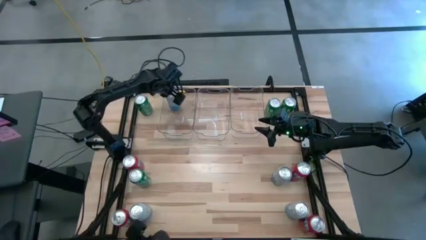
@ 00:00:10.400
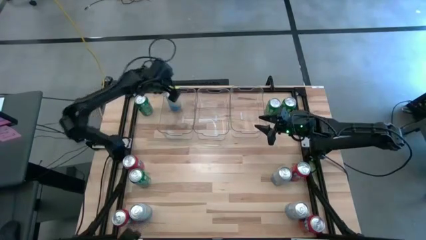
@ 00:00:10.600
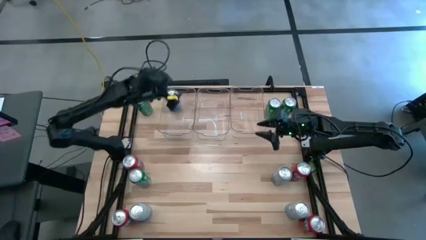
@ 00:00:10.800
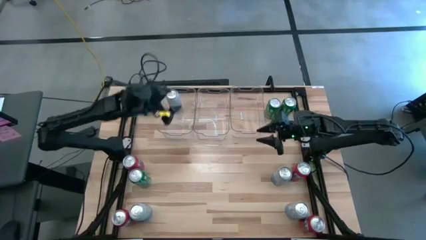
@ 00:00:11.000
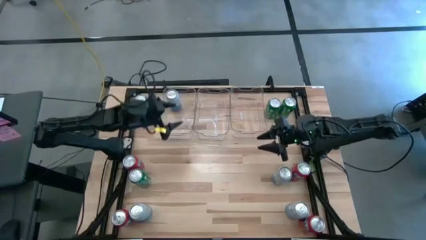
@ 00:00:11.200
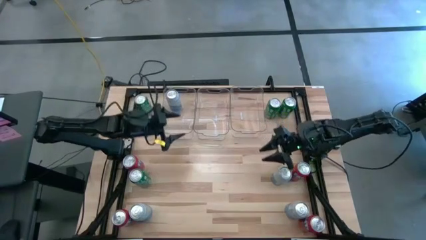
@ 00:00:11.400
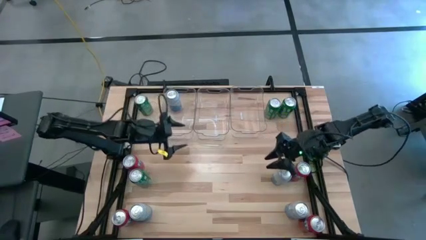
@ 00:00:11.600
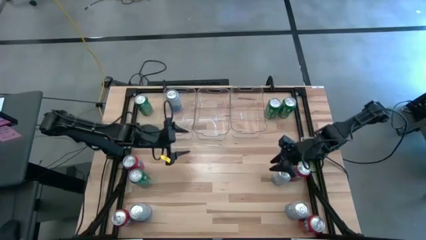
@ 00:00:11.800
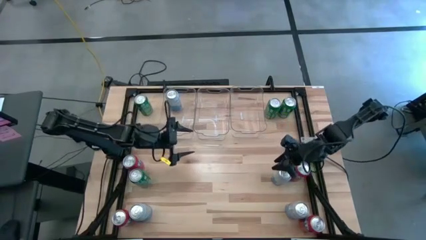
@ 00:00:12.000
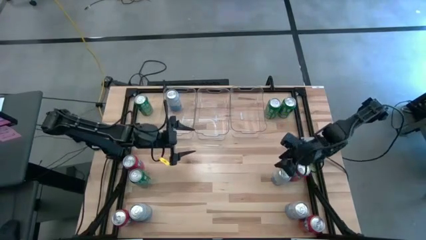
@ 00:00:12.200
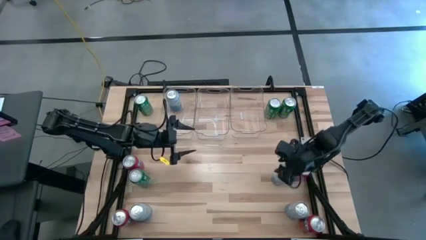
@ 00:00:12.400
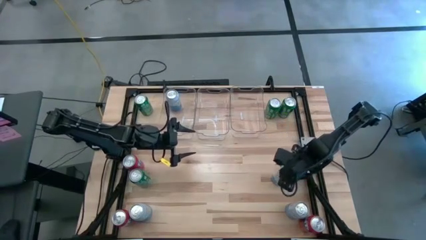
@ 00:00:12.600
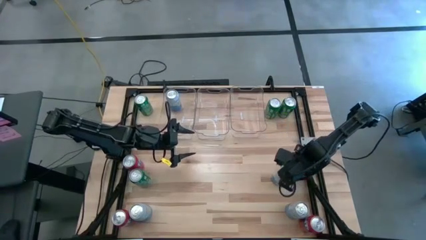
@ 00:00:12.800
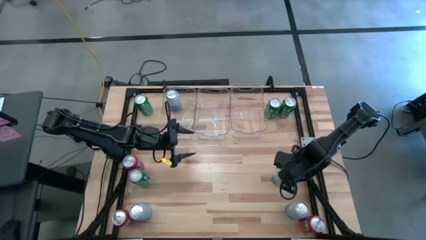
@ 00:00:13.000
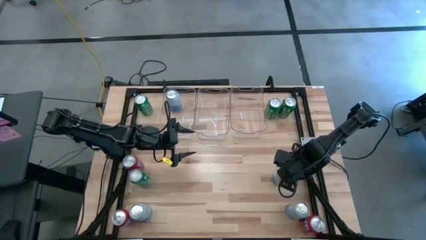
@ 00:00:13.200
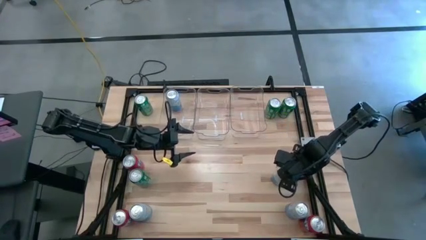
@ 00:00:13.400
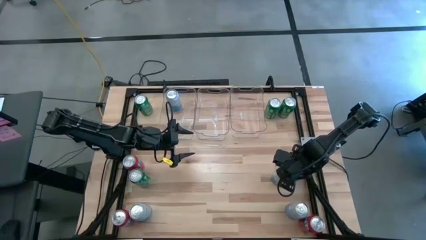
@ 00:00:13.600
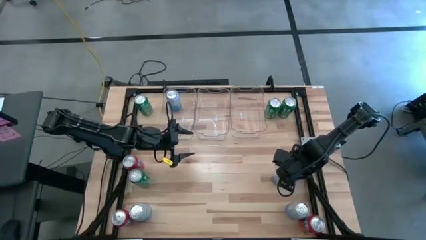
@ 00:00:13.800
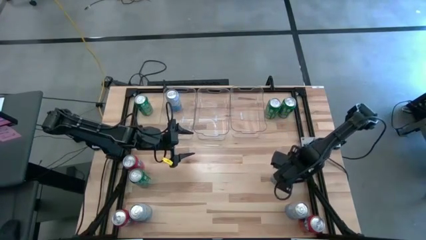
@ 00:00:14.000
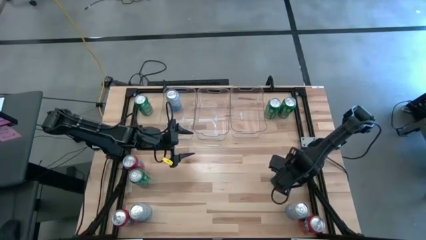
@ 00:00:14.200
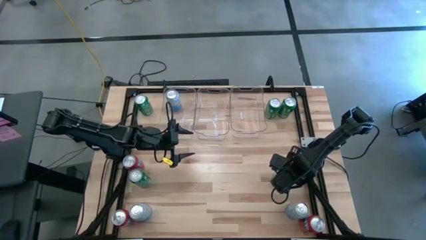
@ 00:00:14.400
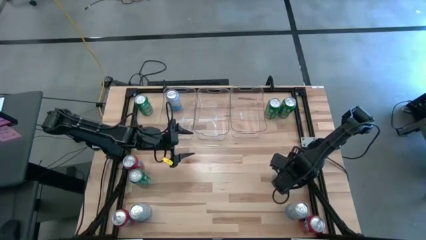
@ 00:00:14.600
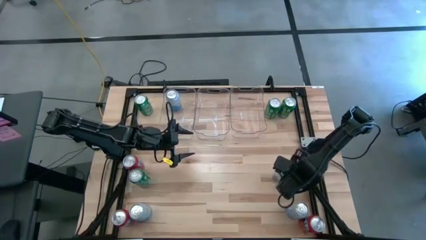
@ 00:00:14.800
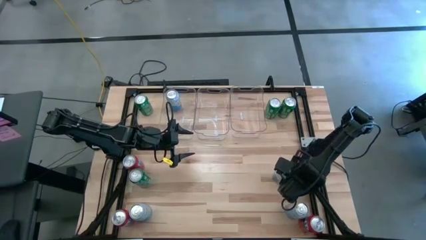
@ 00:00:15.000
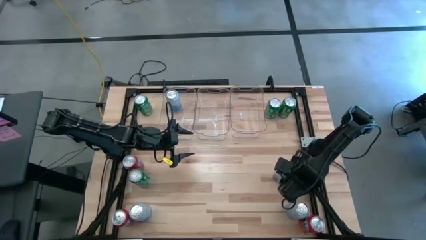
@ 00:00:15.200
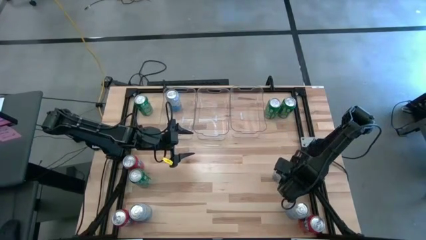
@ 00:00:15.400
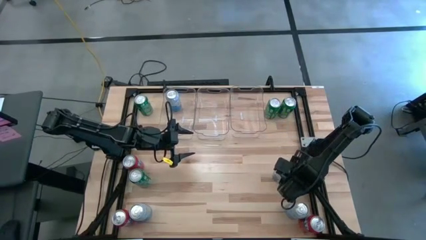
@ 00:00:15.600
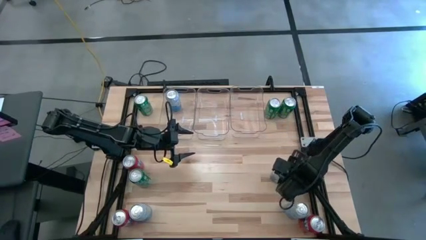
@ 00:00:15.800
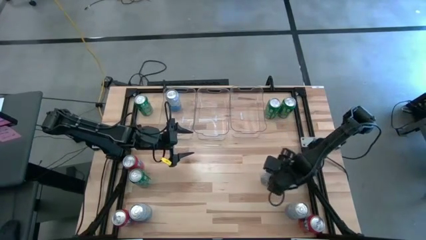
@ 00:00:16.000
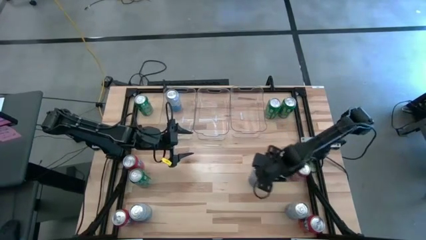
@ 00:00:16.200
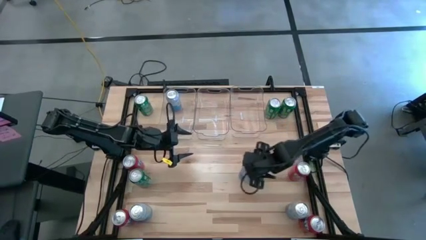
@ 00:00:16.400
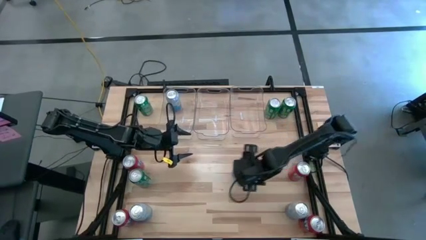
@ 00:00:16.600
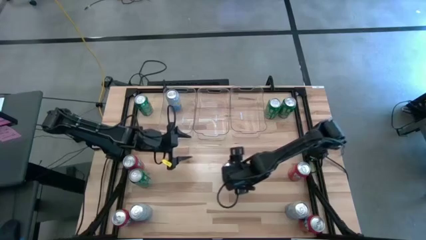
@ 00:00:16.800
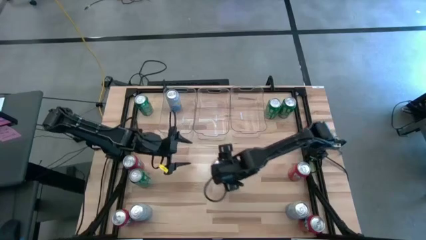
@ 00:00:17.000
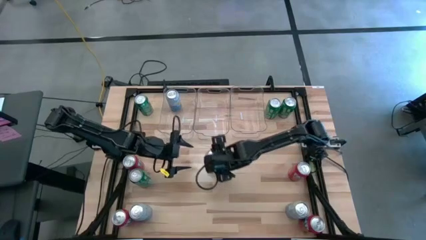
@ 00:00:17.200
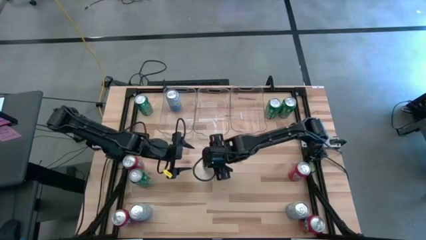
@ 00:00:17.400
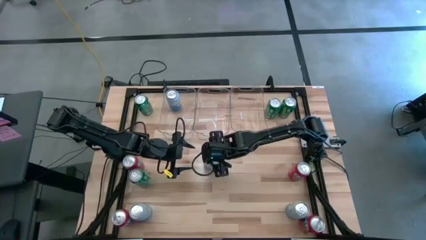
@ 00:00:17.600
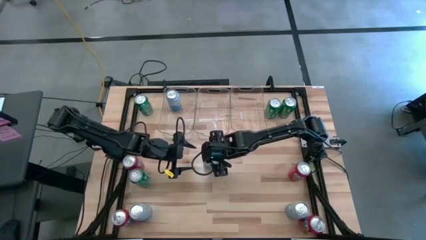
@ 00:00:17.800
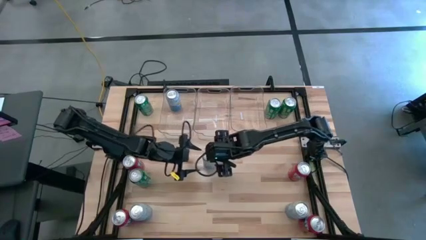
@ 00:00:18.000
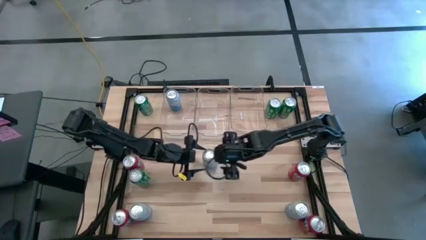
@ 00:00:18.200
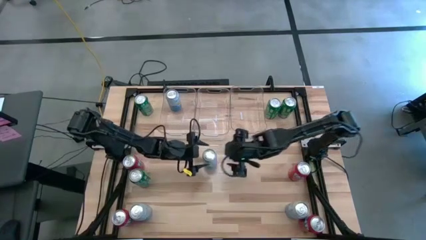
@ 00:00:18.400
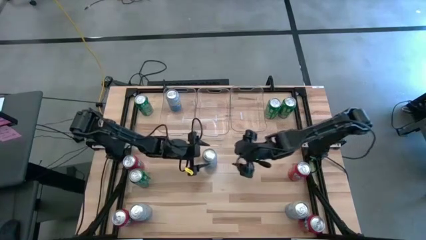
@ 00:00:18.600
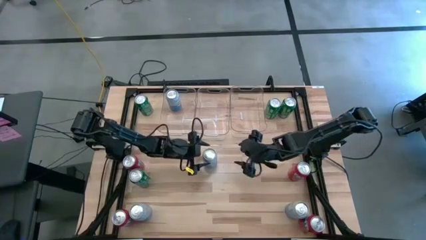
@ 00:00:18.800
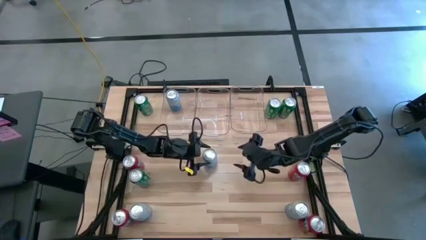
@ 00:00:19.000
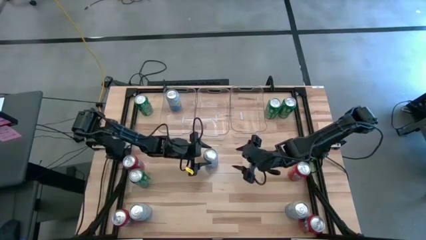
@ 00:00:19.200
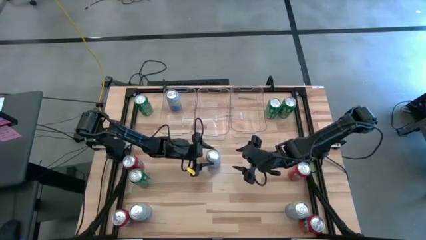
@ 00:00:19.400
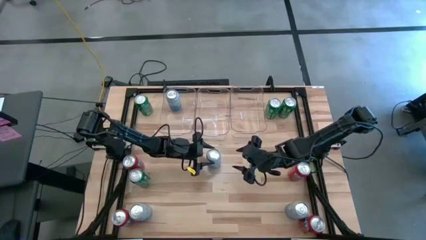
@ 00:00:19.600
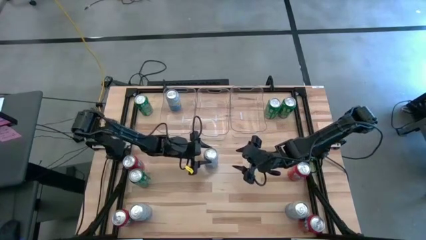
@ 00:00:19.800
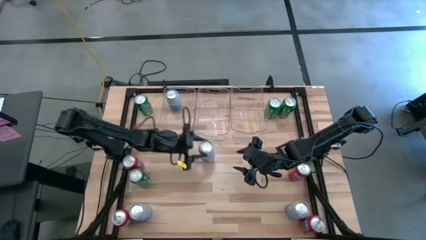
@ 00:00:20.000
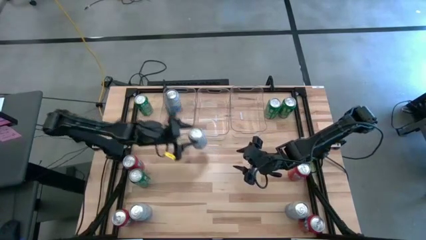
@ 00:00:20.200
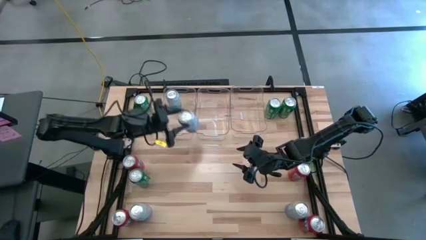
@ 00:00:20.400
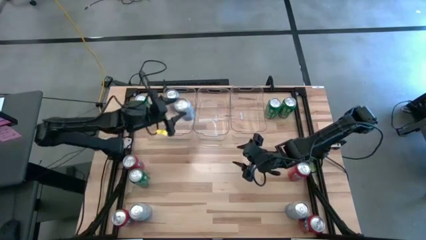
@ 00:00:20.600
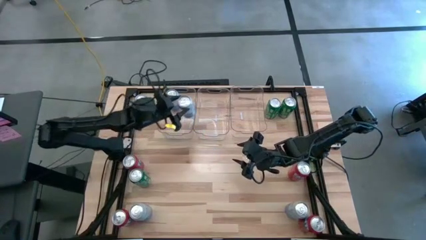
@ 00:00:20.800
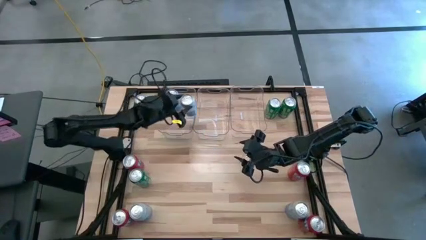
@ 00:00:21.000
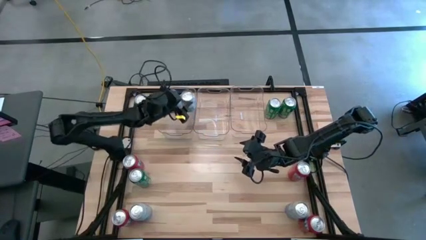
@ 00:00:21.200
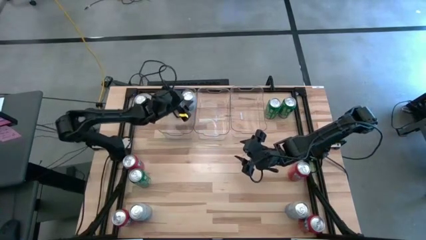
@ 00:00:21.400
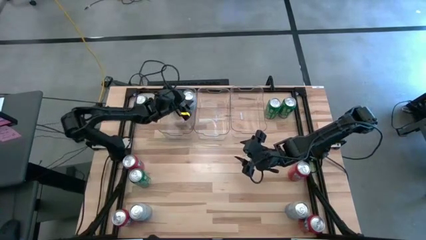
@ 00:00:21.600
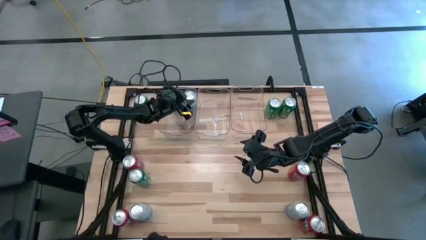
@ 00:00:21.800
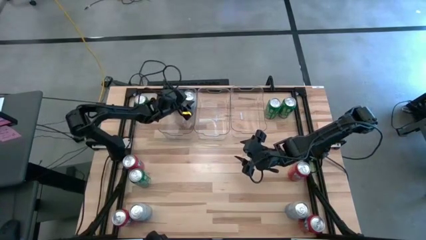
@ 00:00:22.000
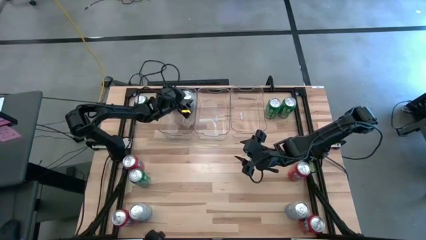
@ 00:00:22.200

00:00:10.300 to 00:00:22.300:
Task: Sort soda cans
Put the blue-white soda can into the left transparent bin
